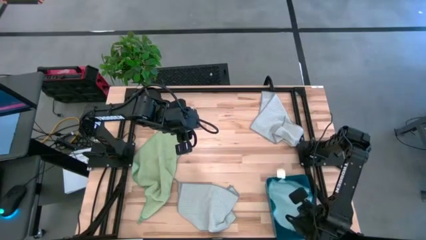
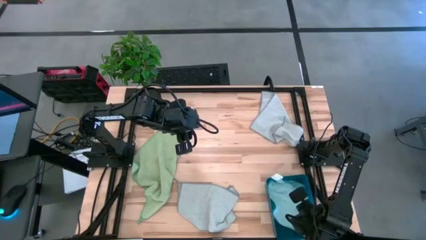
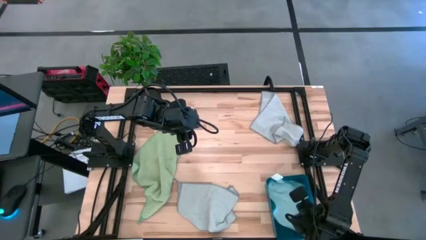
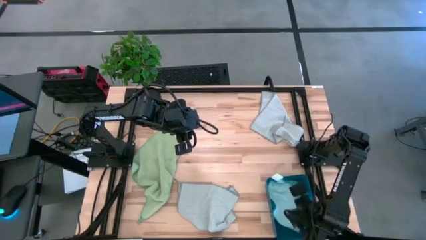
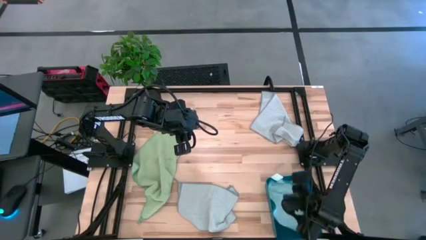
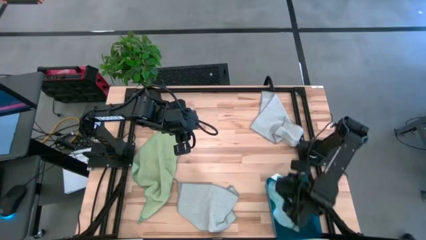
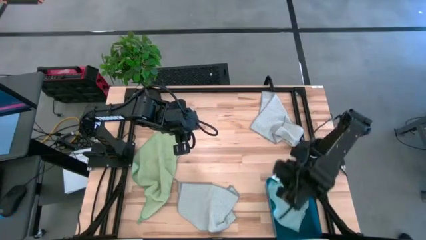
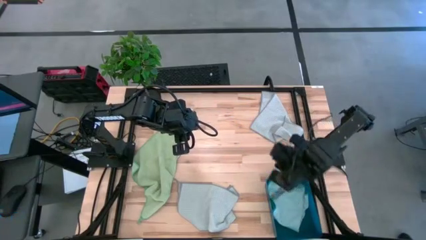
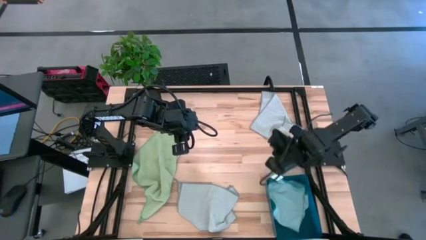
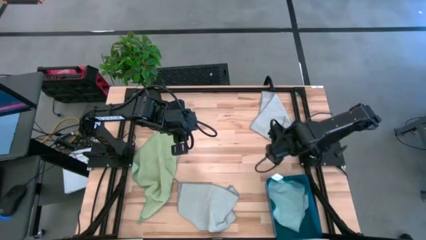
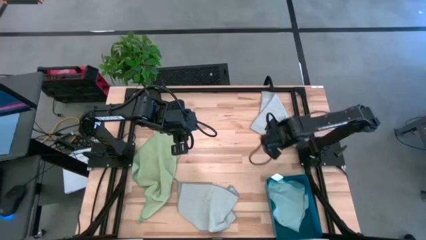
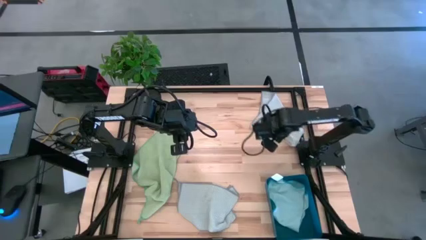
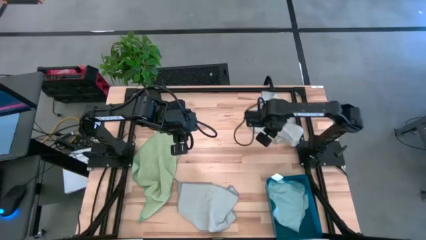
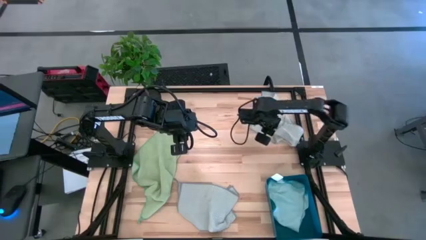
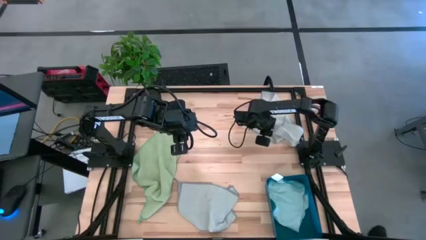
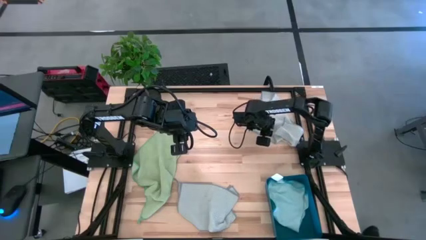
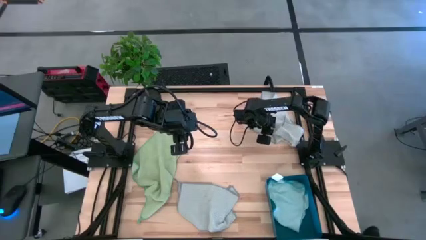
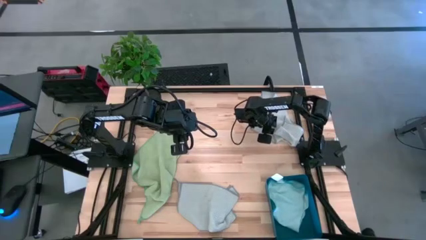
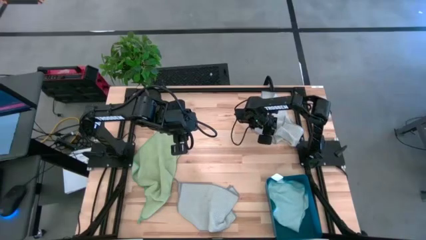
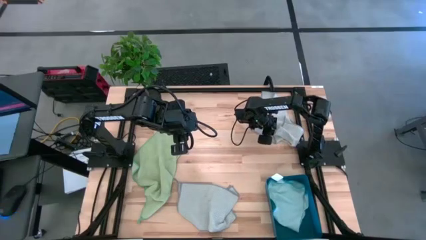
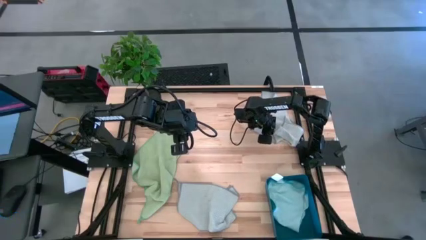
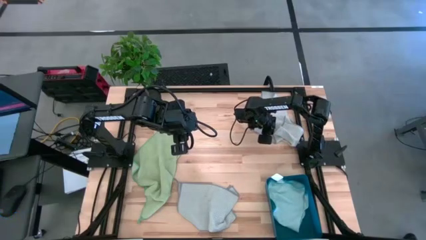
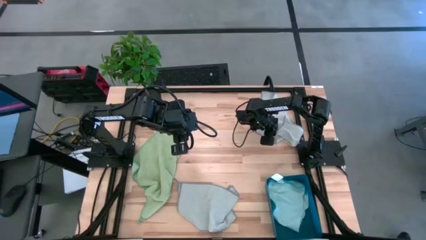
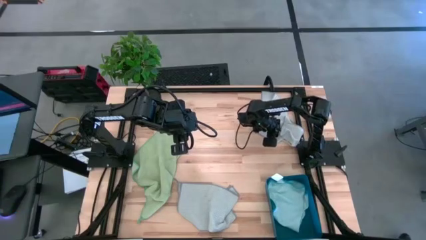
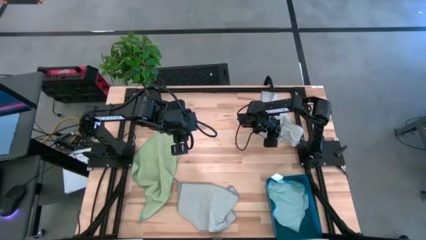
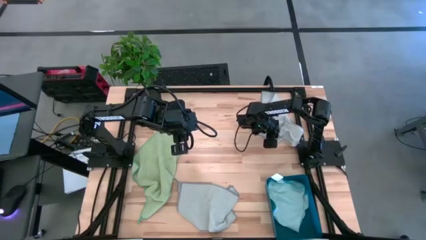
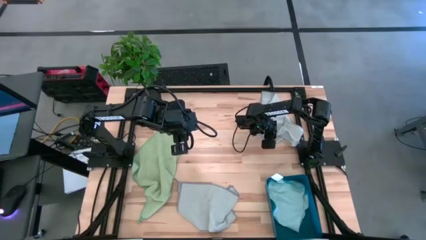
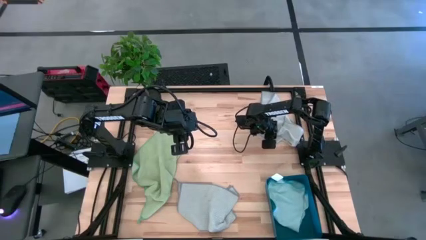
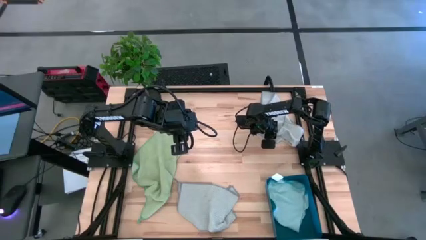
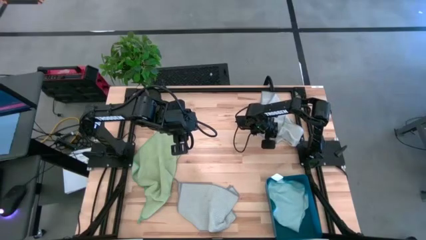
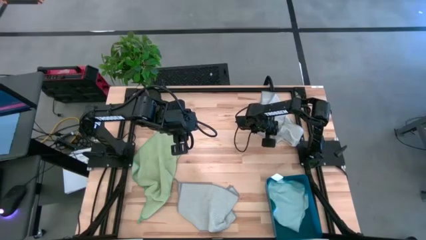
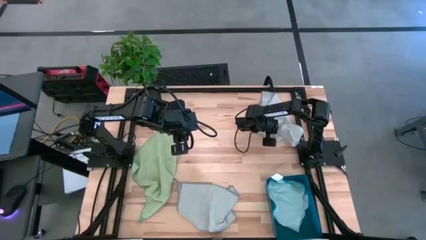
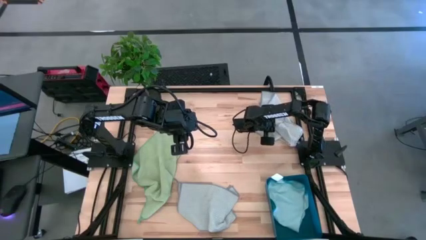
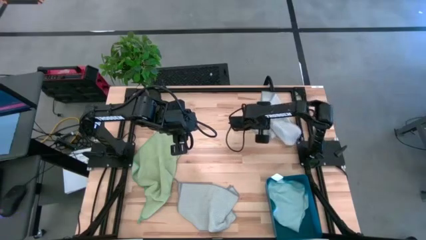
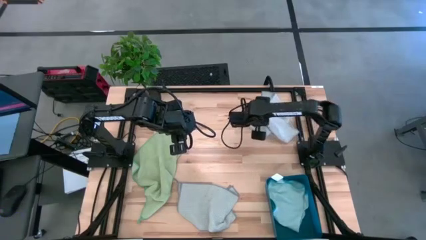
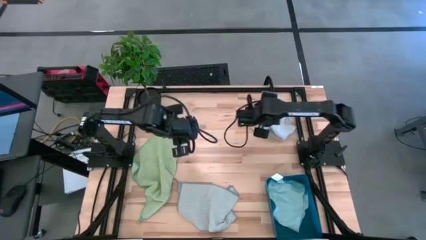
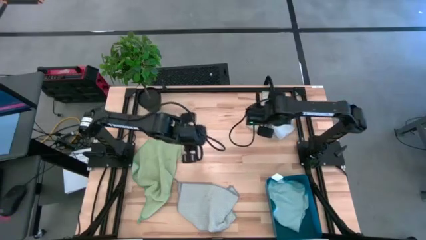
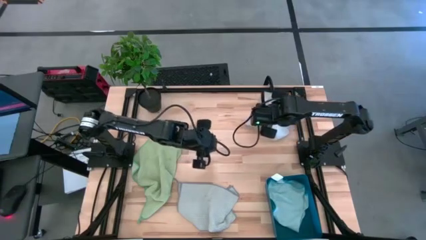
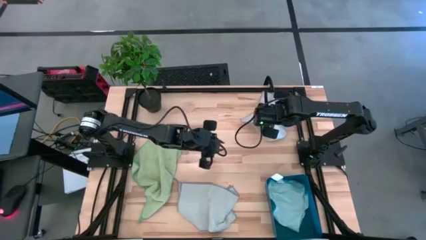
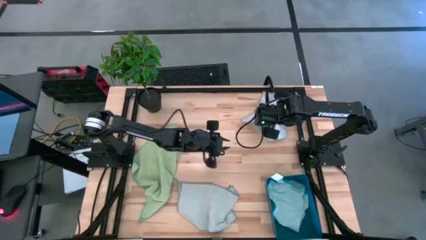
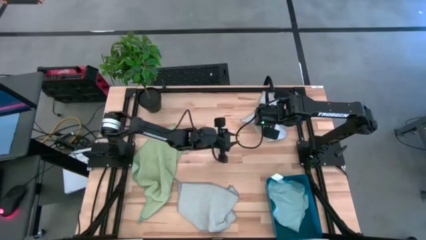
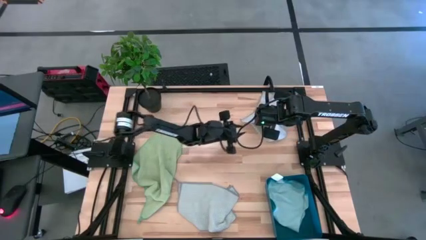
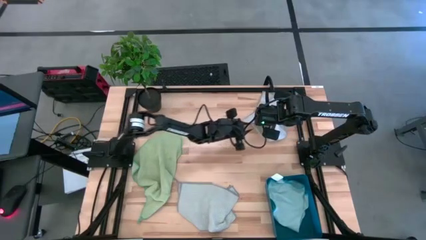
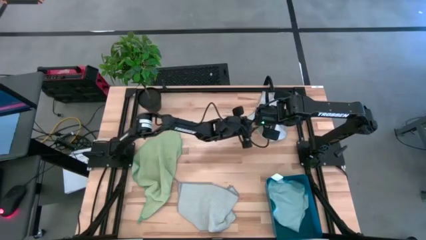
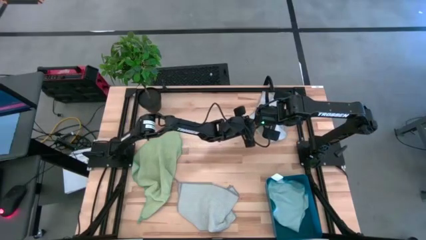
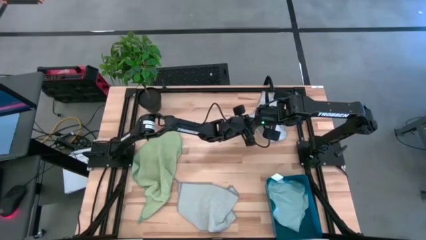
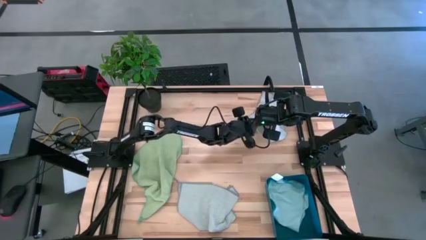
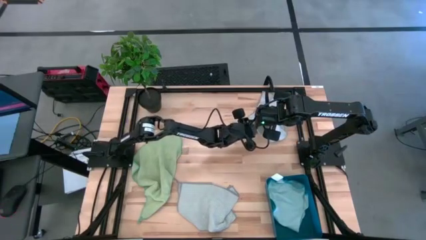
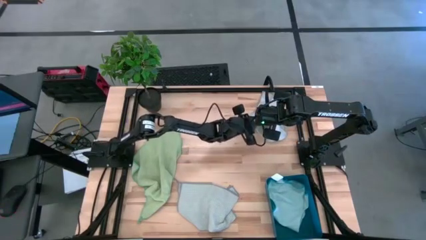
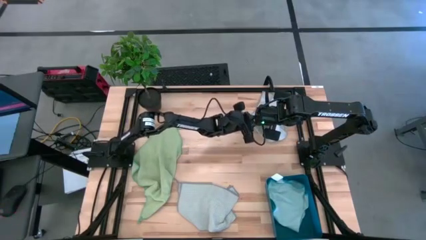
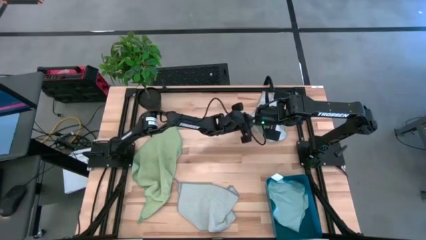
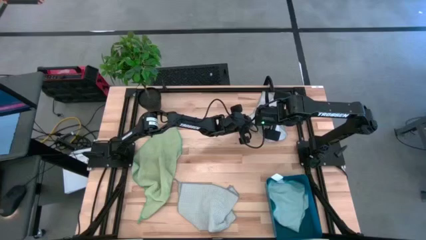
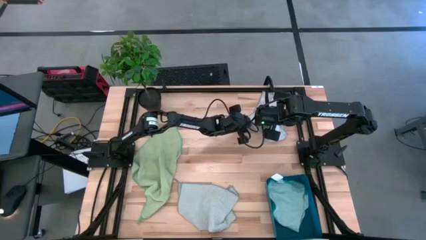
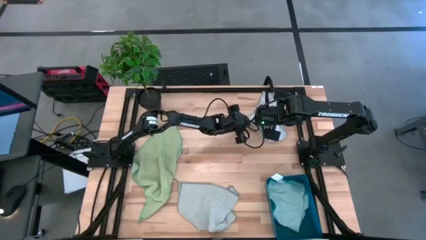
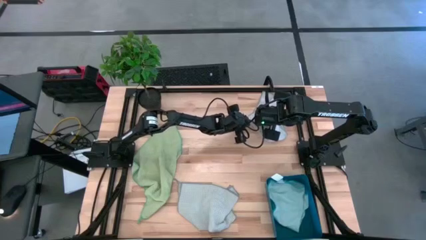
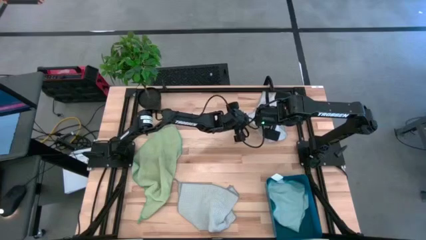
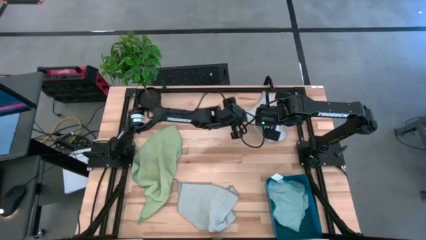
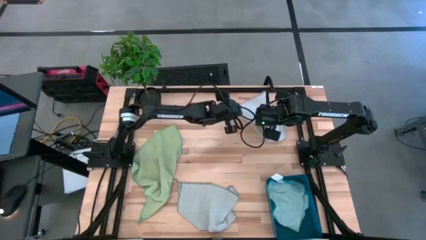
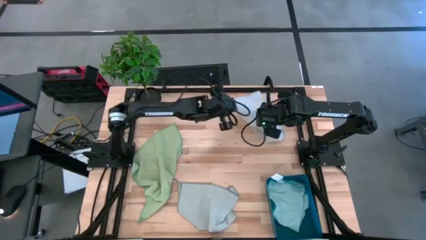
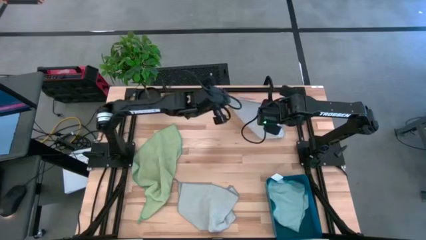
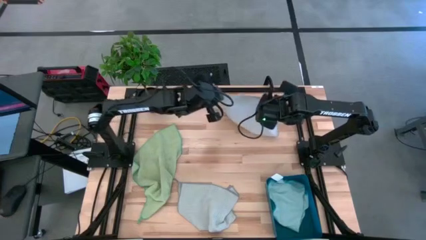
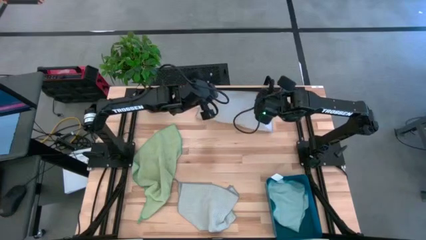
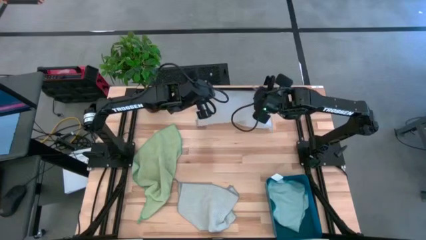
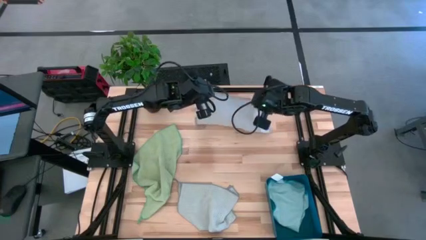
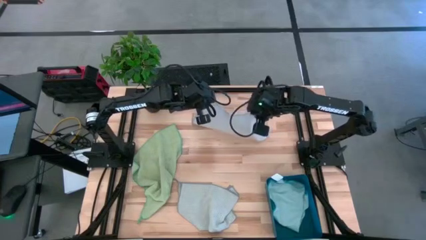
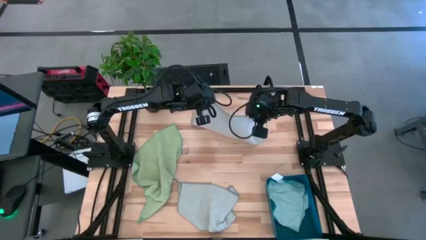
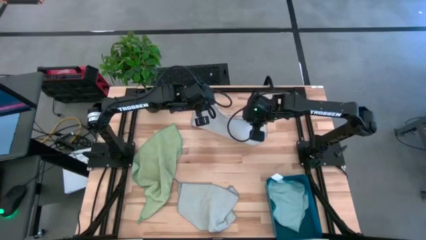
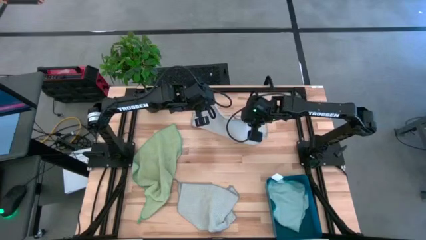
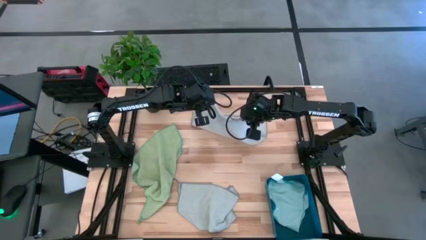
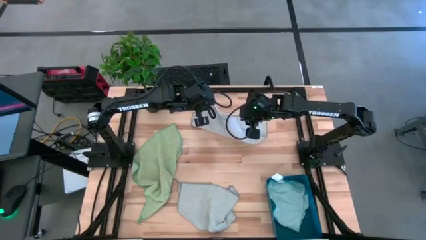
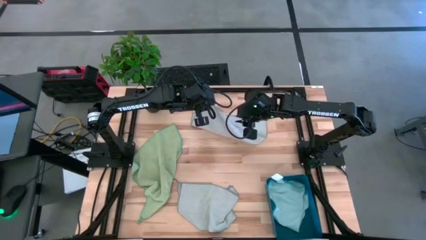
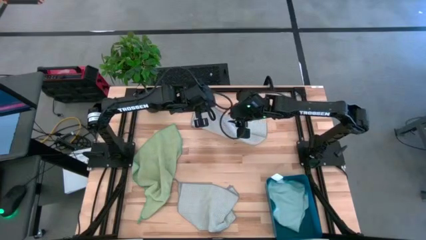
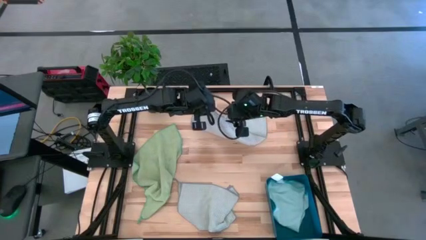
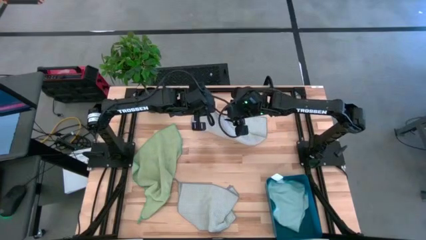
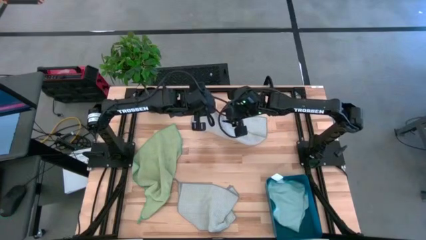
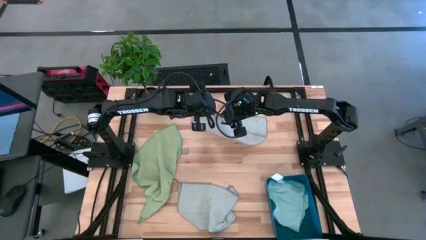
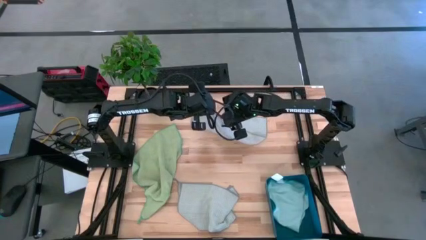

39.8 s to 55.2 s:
Task: Fold microfiber towels
Fold the top gray microfiber towel
